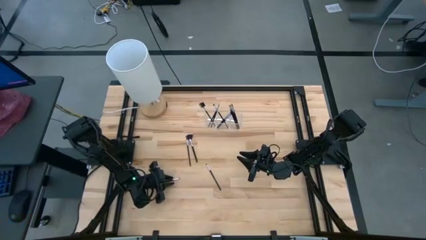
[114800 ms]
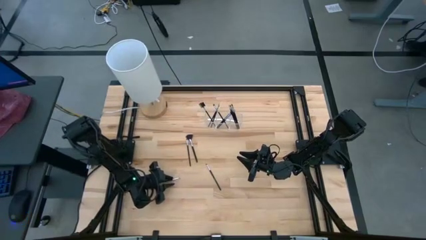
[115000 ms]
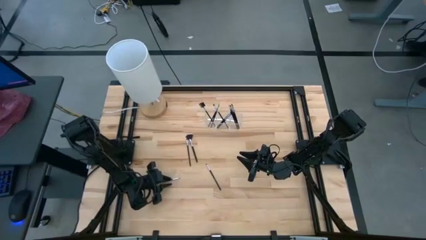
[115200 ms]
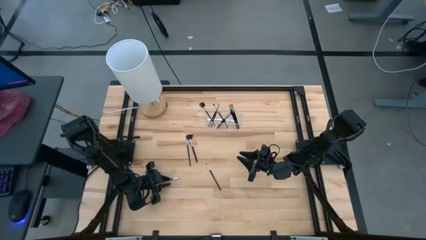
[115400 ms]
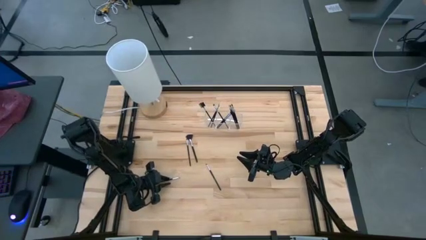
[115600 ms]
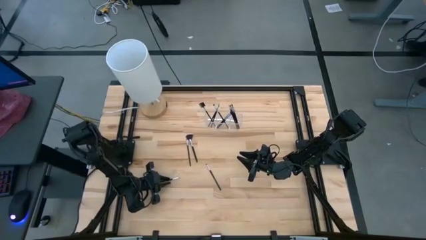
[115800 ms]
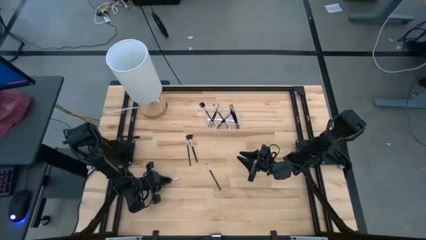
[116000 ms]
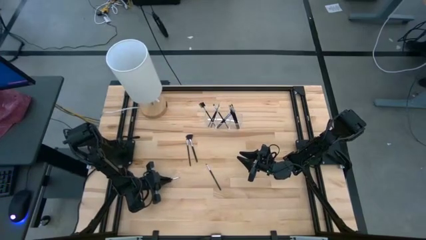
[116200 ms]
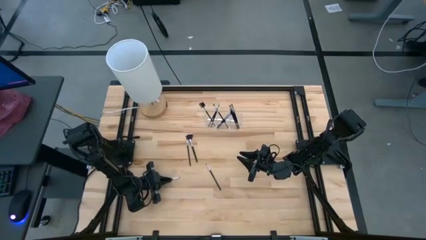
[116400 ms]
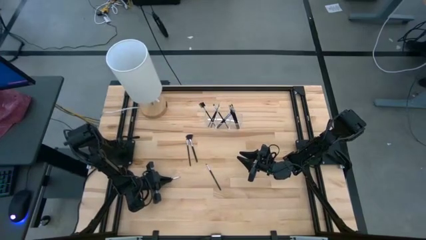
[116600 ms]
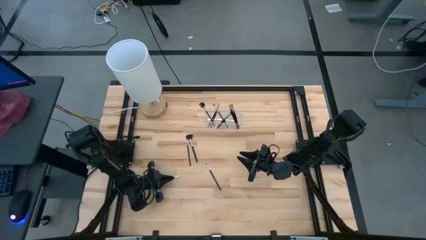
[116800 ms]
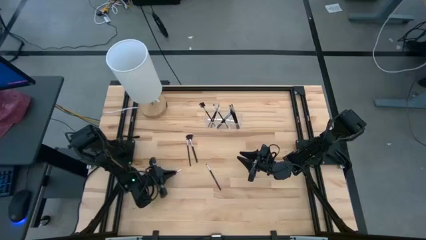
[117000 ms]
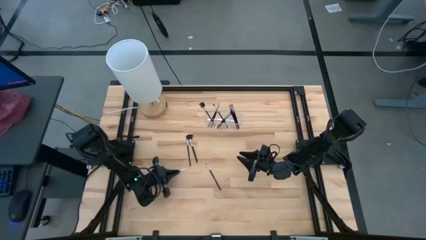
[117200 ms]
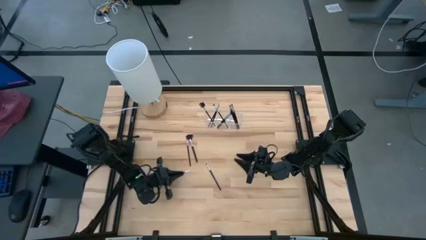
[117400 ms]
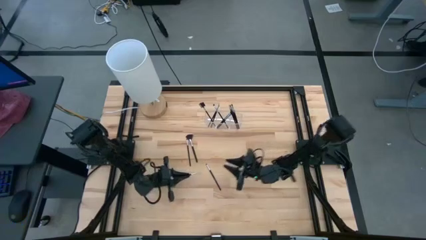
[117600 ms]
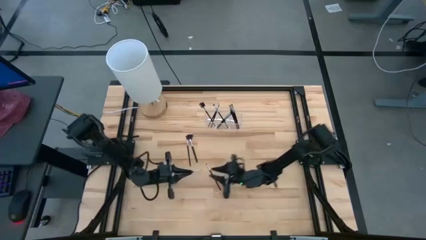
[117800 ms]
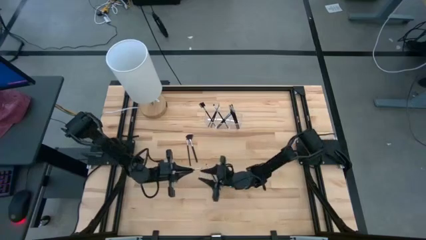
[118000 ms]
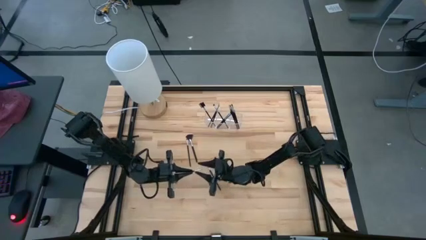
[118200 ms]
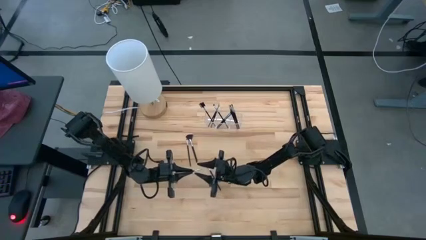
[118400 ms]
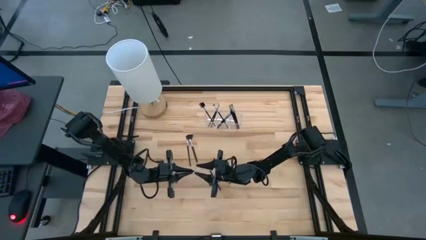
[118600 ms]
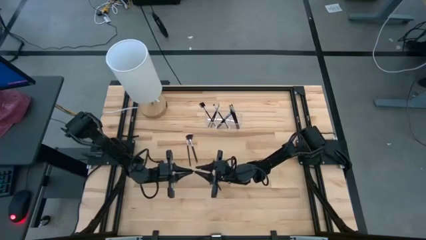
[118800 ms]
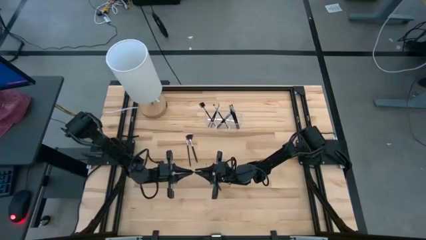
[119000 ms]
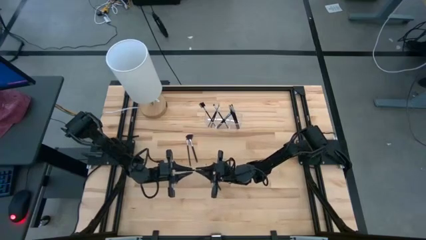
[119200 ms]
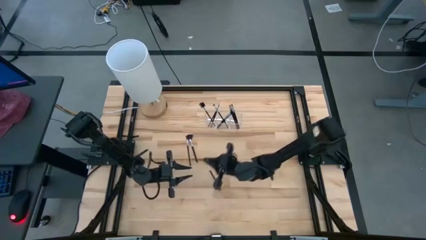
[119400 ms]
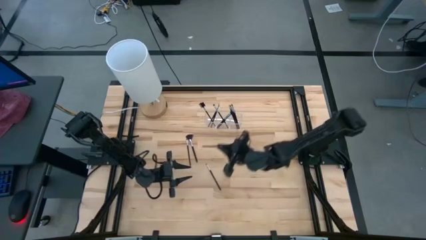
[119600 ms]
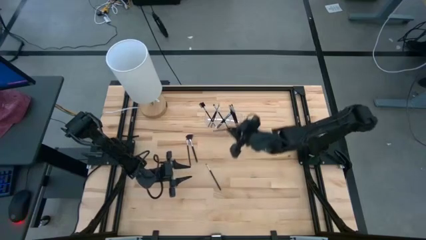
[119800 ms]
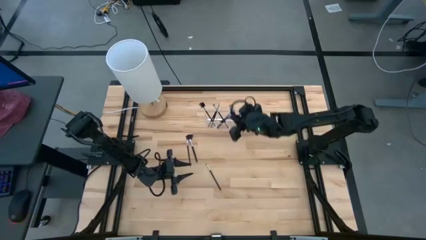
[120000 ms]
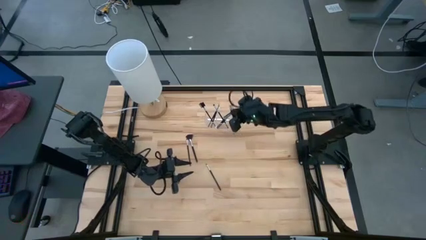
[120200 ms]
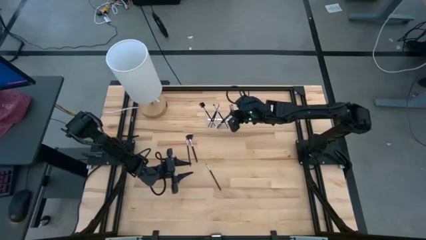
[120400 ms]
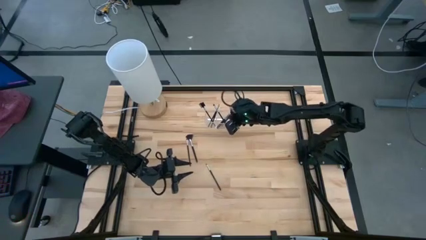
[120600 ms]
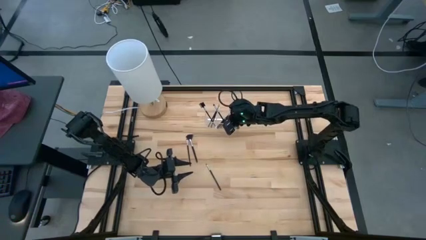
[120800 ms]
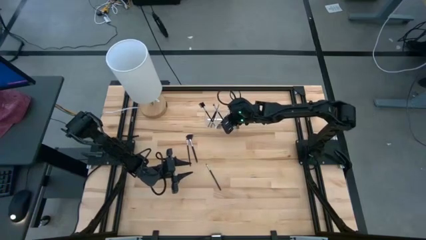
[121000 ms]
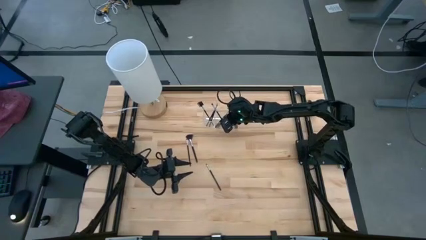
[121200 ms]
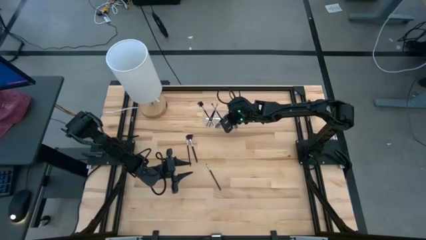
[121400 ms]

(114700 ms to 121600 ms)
Task: Put items in baskets/containers
Put the black liner brush into the transparent organizer

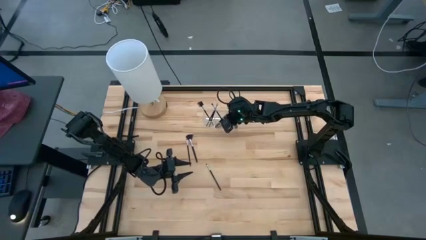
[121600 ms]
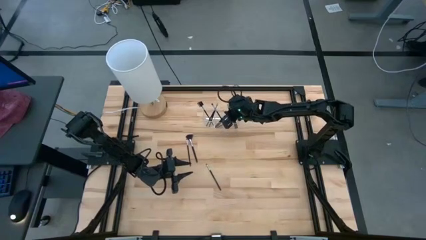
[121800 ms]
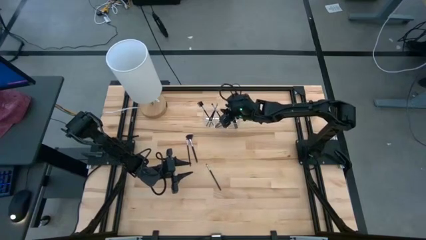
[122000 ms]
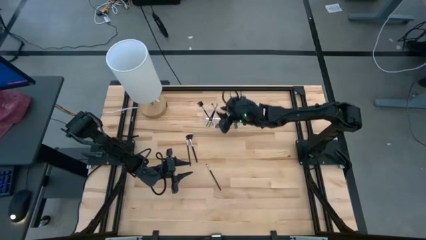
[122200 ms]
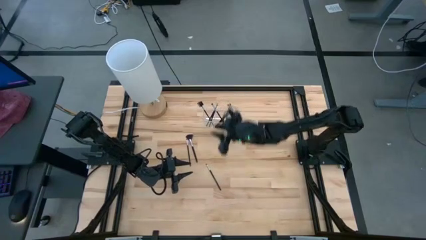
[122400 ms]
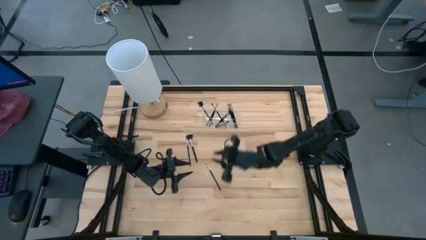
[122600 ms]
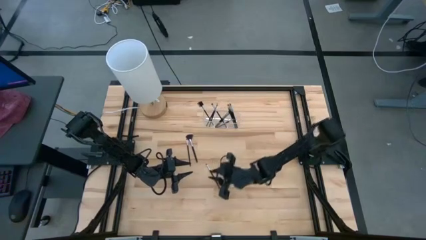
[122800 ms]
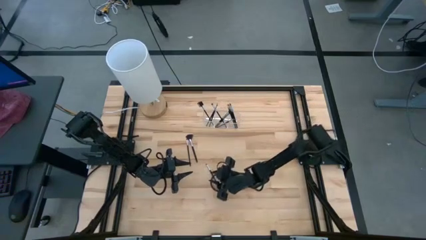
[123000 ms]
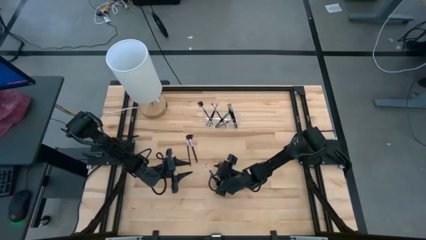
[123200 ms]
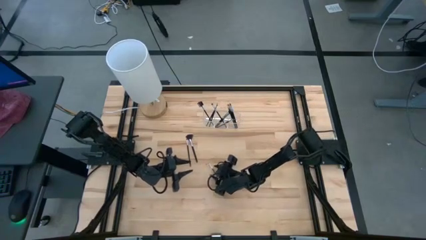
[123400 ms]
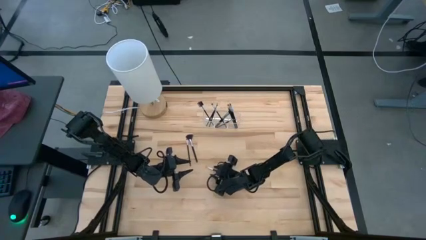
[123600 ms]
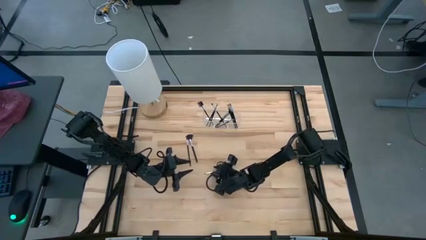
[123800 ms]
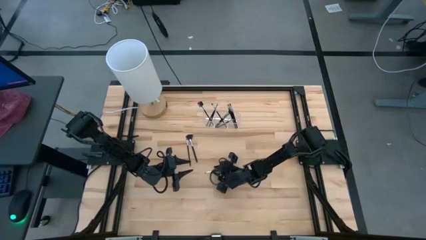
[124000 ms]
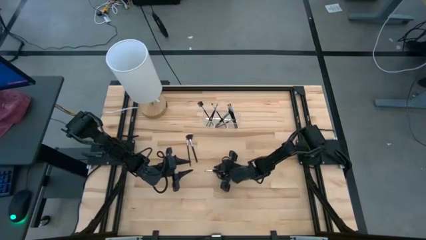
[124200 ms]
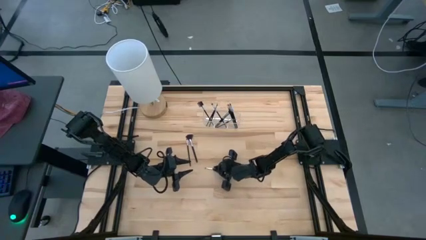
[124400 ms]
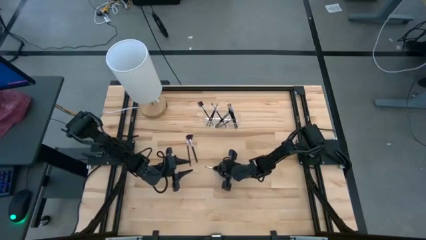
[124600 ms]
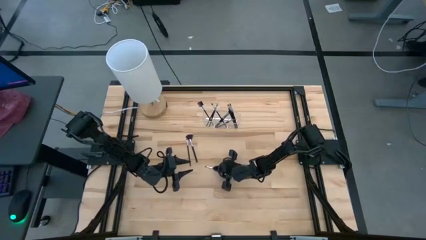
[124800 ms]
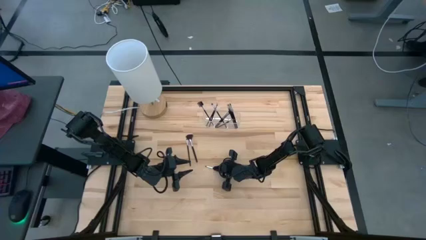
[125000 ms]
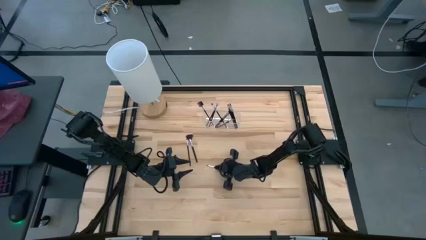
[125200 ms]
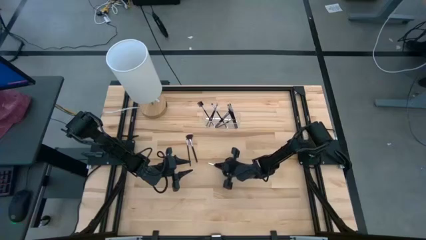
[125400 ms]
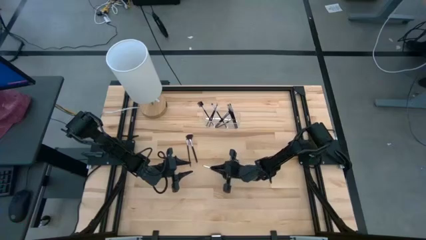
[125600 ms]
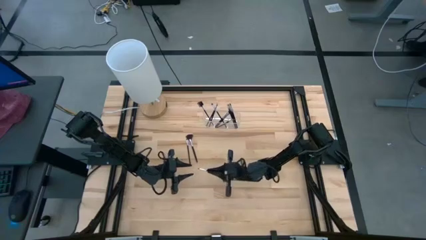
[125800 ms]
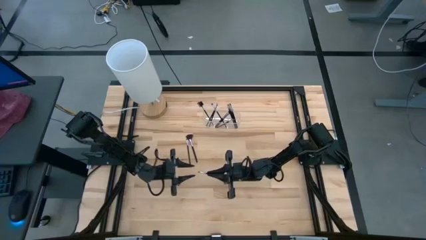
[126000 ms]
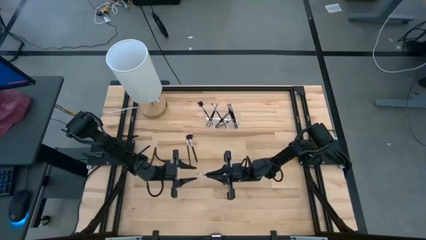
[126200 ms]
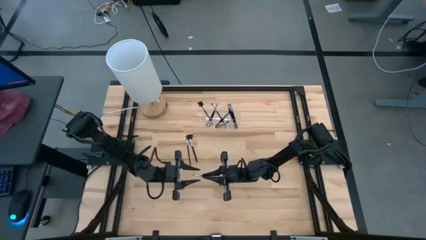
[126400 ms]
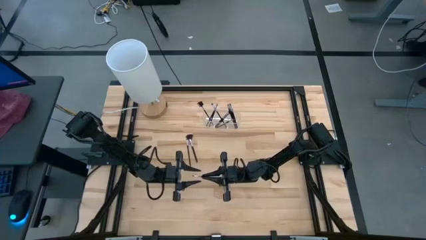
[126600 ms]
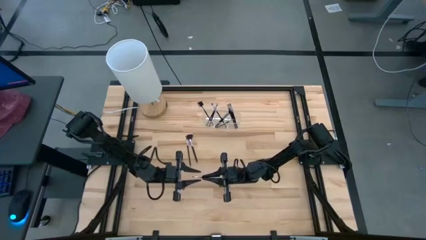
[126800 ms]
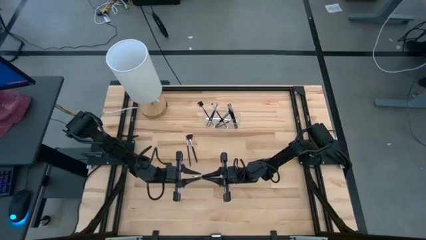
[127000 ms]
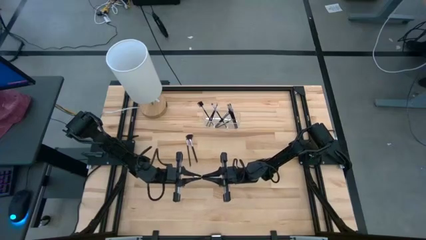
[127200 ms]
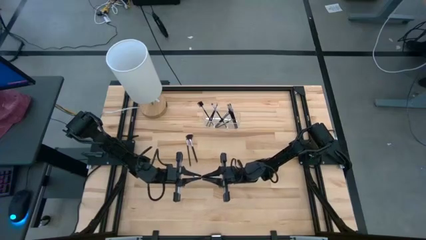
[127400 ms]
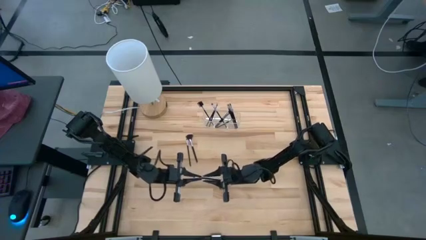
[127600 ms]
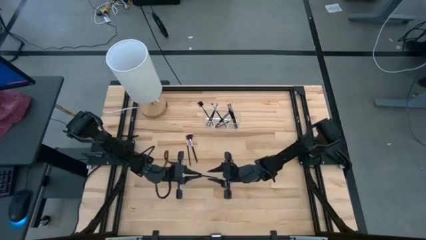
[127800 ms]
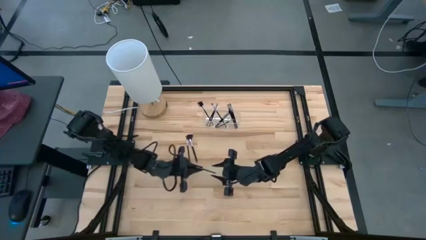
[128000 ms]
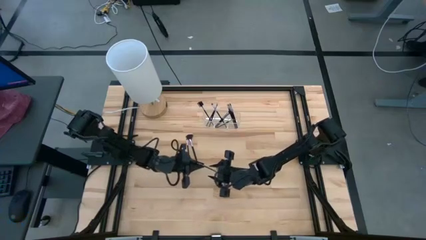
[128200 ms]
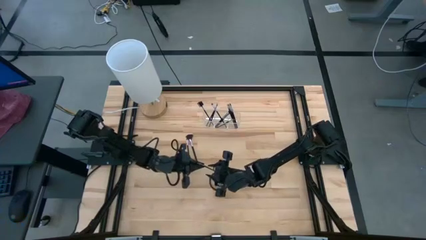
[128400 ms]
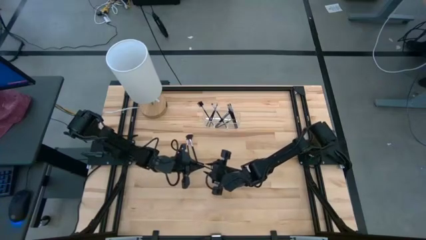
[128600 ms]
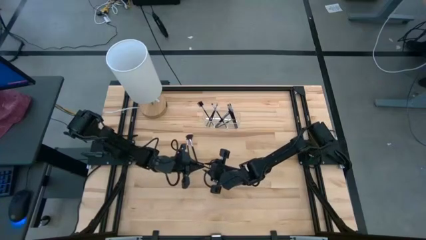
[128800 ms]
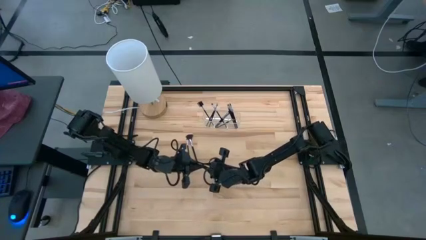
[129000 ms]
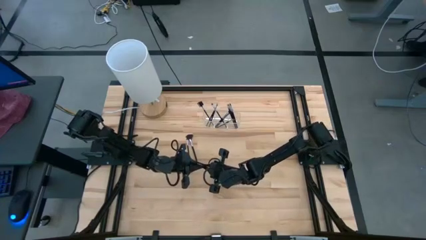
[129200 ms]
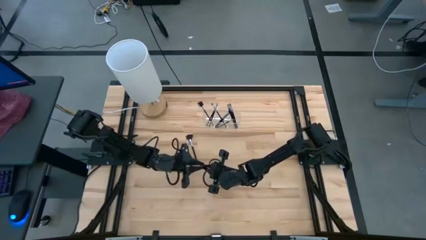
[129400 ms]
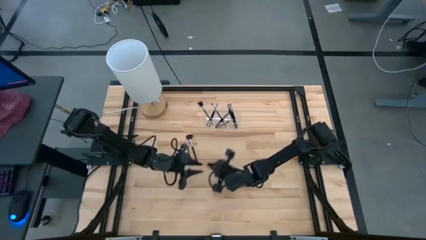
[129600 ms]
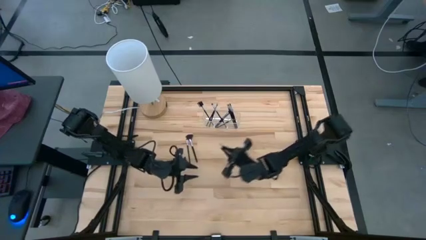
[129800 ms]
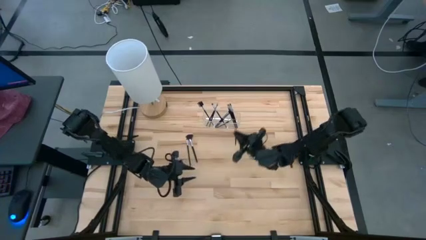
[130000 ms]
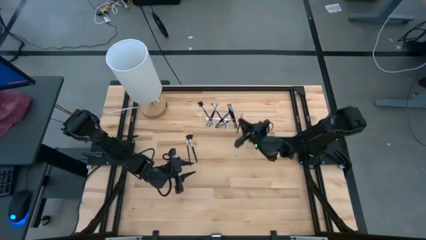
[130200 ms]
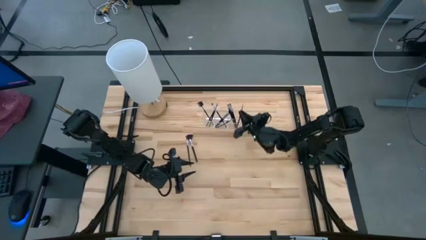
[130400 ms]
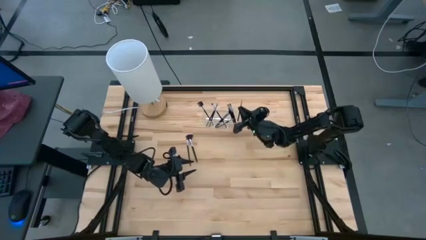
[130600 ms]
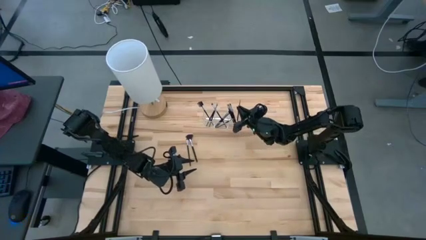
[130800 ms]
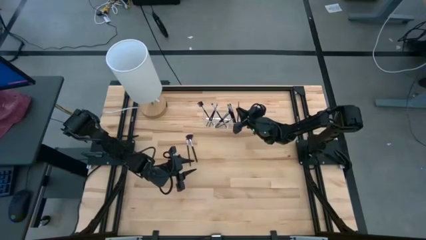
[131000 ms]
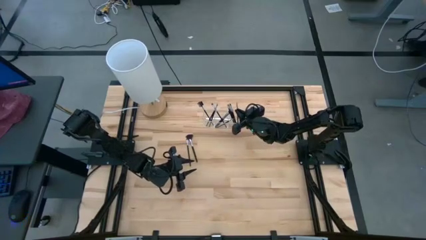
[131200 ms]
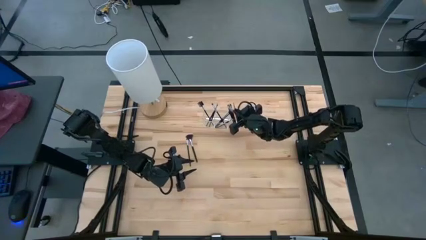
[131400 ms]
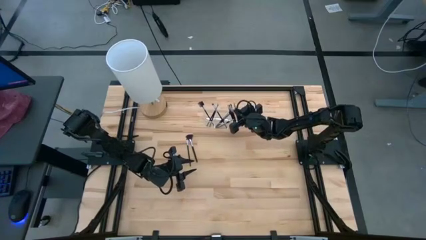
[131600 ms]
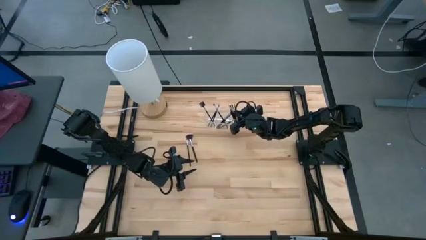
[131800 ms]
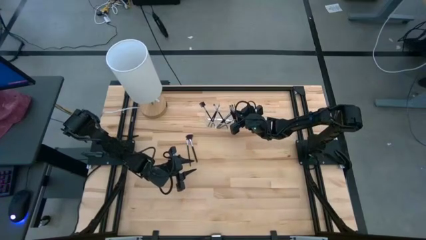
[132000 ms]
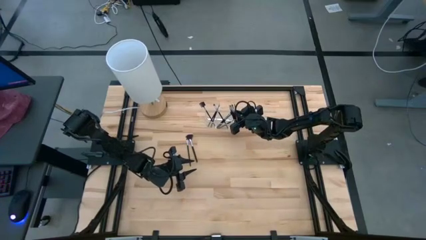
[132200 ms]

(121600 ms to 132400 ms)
Put the black eyeshadow brush into the transparent organizer
